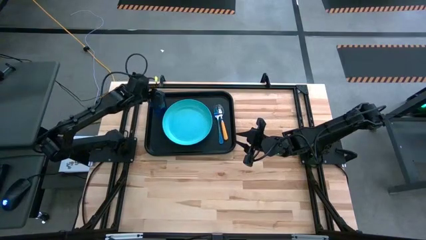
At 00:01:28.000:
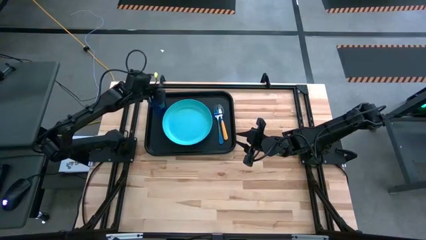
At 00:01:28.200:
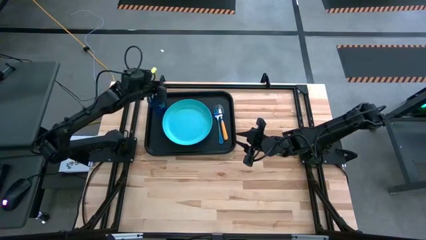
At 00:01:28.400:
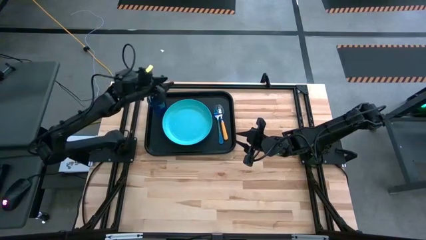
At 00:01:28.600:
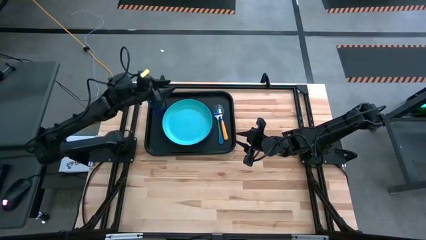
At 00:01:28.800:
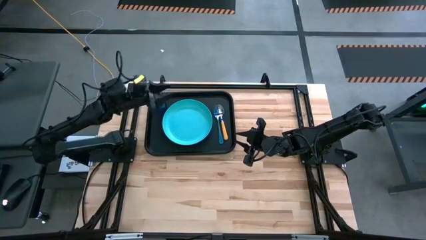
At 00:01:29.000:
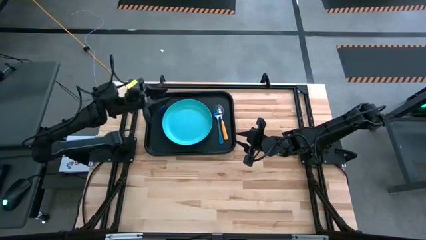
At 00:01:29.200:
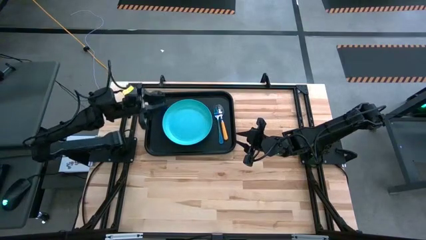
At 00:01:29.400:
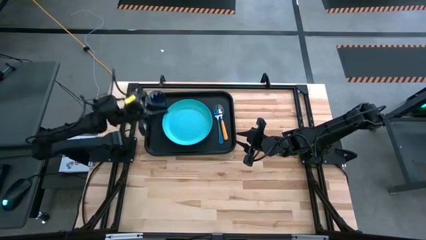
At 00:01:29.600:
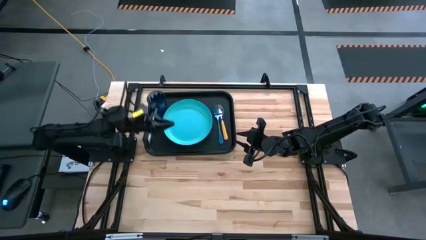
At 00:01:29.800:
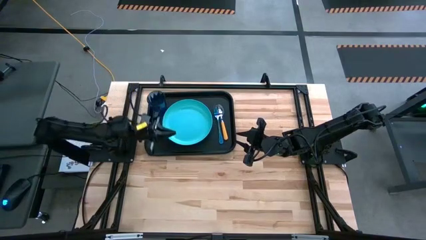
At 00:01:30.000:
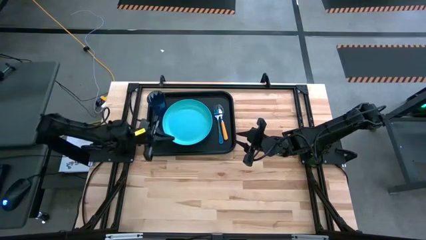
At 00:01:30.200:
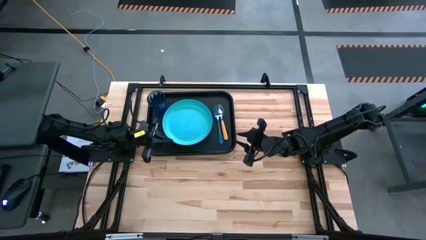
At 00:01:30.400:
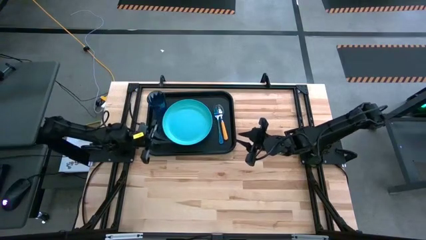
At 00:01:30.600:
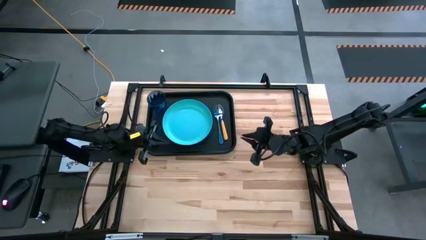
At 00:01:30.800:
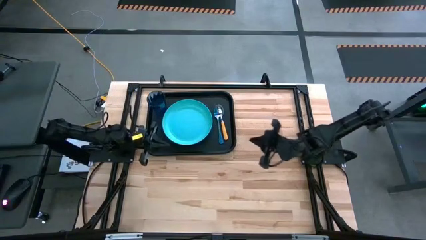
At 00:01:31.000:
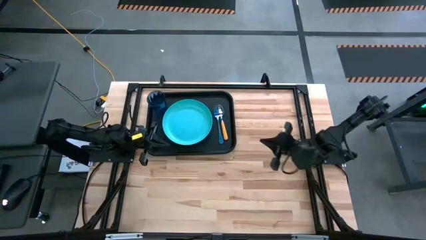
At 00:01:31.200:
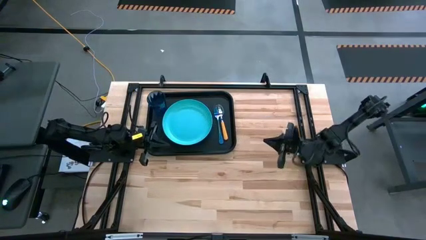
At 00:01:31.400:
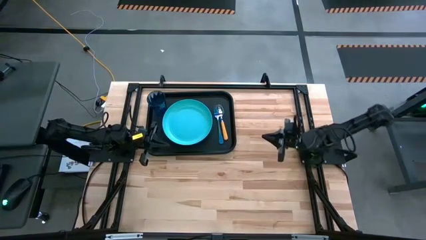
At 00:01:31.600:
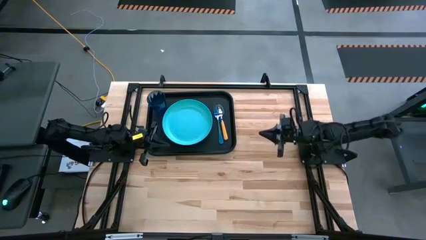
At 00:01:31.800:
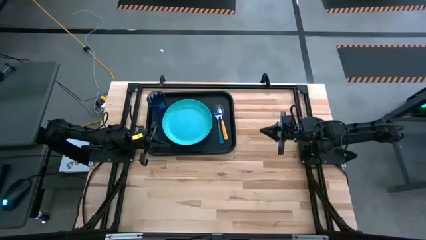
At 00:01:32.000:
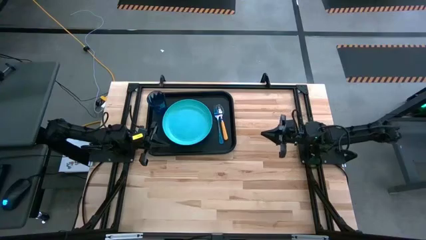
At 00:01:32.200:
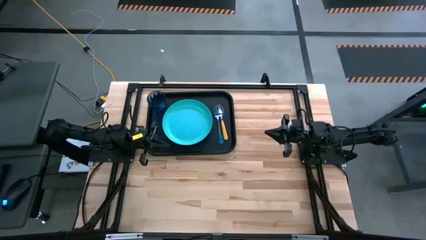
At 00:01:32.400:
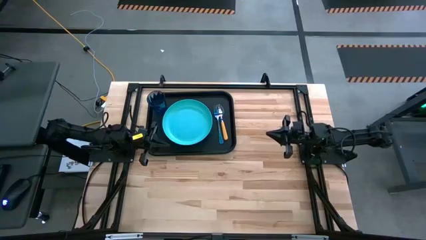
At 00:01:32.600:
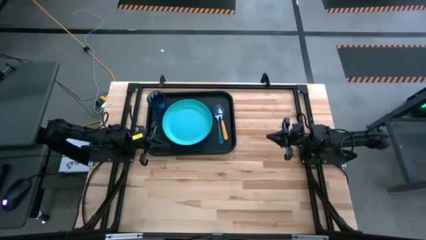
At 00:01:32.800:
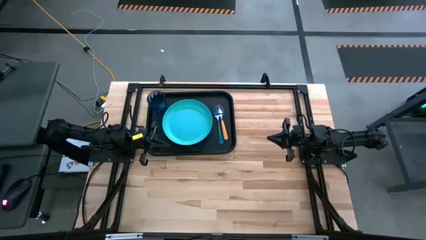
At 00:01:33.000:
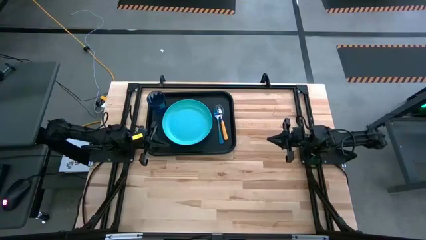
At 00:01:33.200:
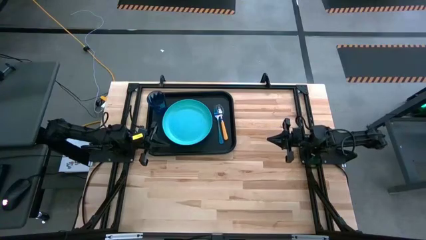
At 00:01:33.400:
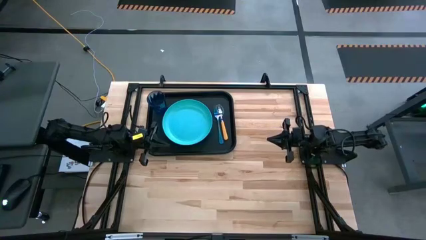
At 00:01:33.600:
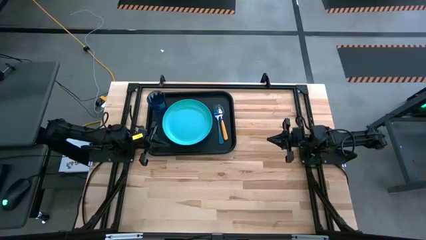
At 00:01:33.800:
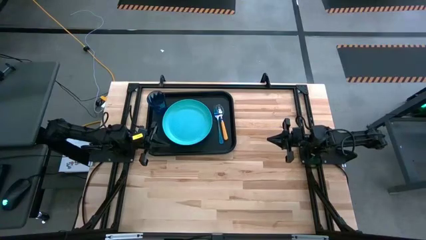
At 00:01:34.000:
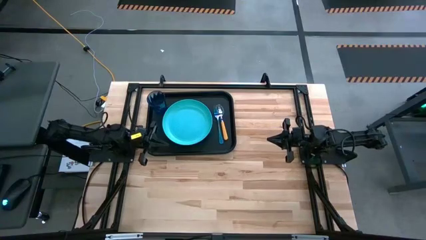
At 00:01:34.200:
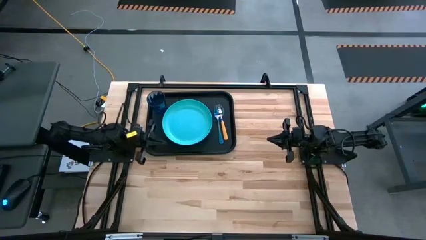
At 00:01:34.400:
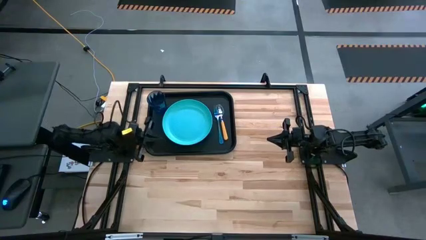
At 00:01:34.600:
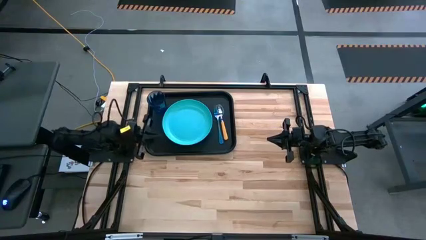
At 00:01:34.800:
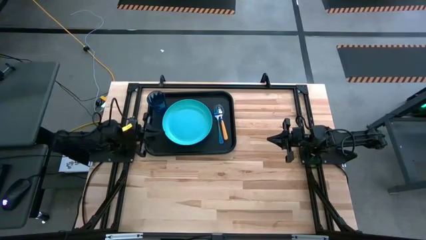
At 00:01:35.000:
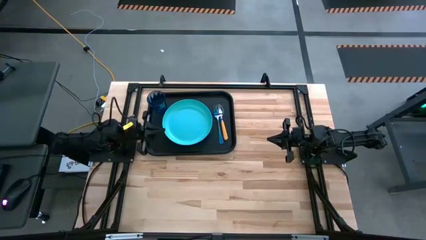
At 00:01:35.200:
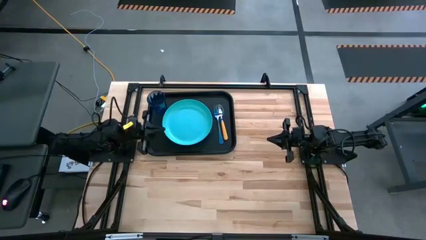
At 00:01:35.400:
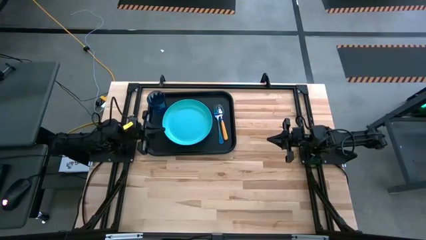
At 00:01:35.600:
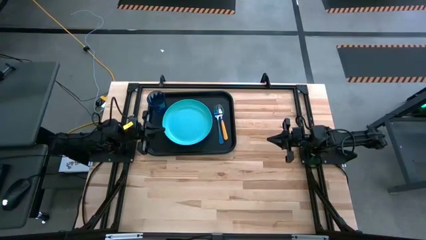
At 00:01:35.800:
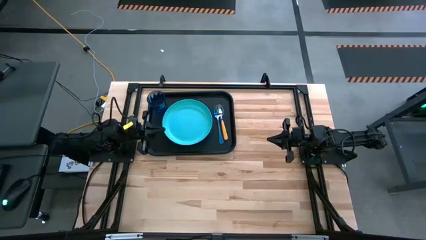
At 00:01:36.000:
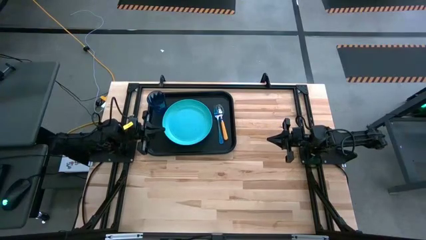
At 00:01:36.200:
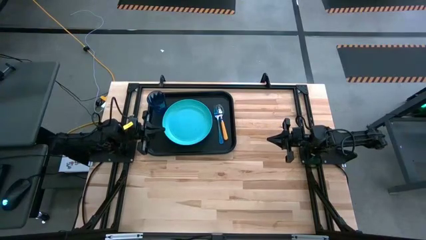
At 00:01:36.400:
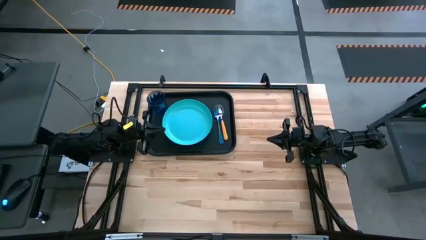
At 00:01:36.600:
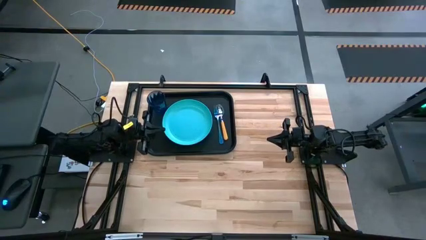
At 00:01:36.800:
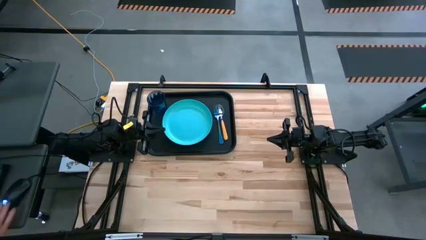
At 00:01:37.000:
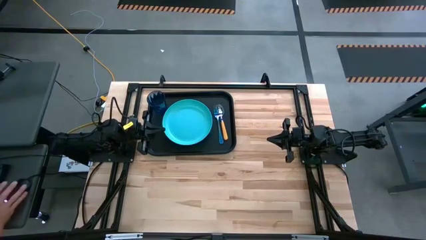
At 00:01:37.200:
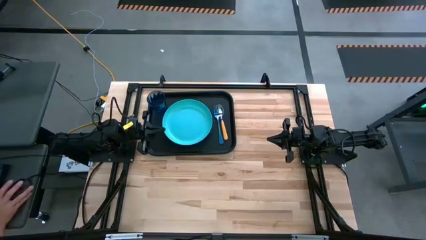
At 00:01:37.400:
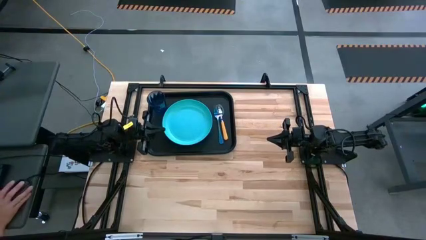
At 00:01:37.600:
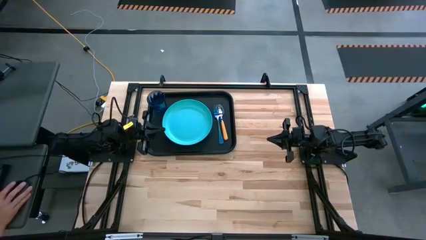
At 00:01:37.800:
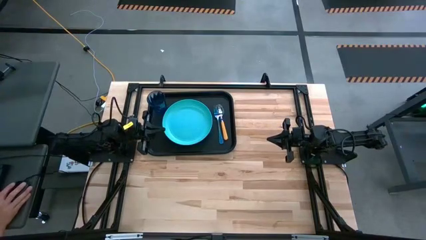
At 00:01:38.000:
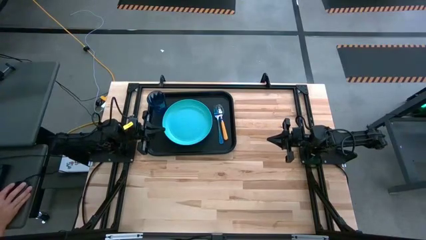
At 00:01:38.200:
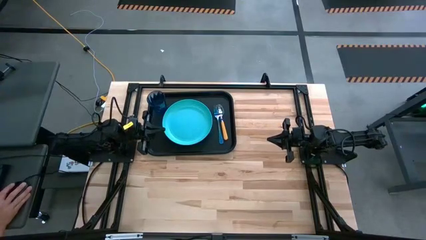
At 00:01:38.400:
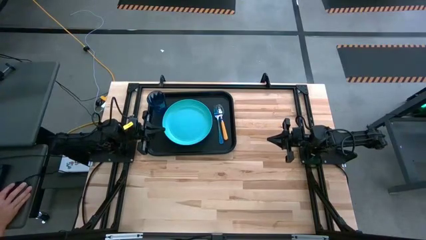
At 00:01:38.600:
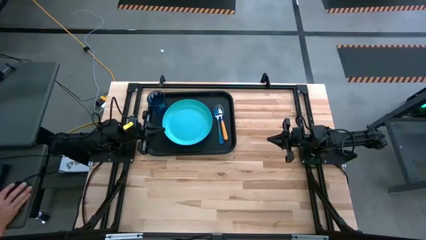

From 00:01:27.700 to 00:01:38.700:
Task: Pick and place plate/cup/fork/spoon on tray
Return to Home Position
